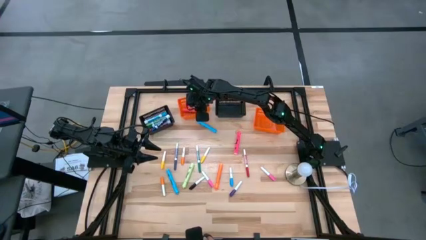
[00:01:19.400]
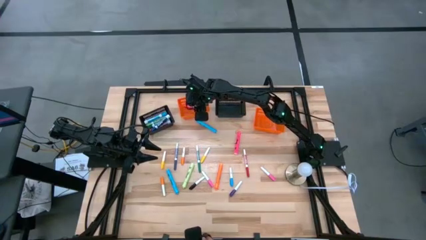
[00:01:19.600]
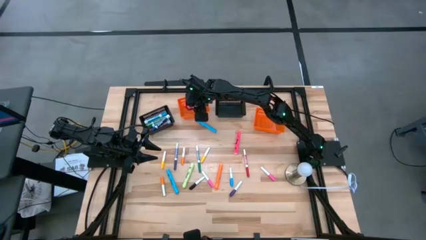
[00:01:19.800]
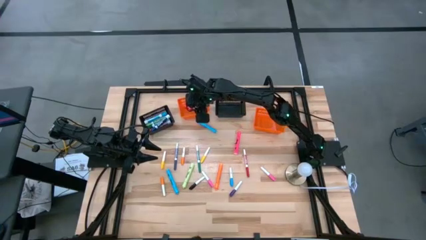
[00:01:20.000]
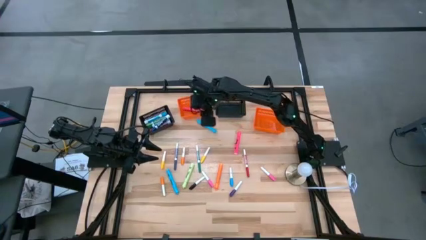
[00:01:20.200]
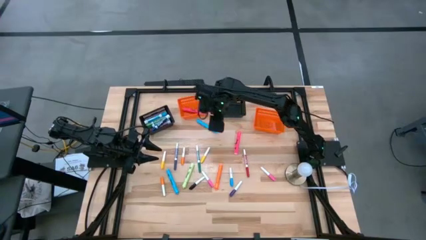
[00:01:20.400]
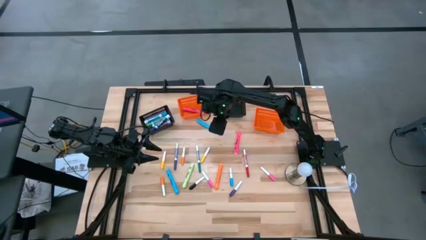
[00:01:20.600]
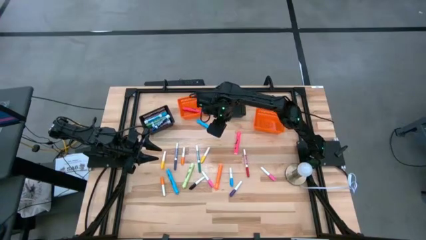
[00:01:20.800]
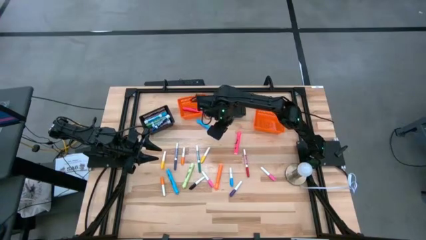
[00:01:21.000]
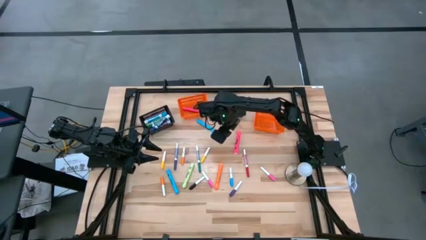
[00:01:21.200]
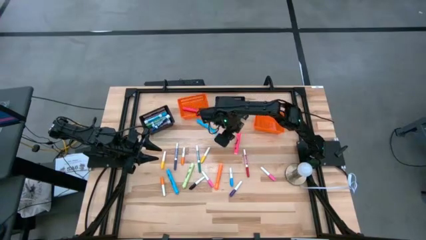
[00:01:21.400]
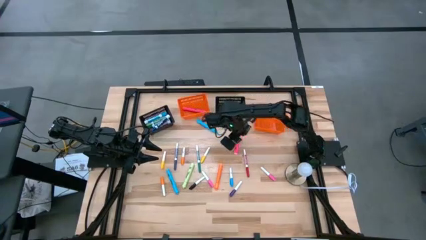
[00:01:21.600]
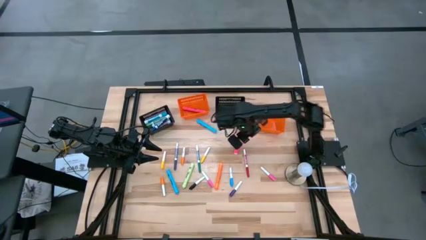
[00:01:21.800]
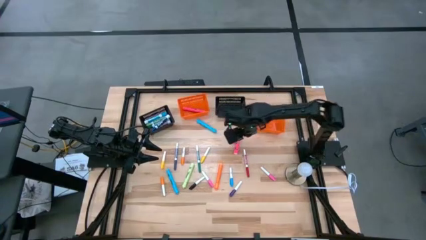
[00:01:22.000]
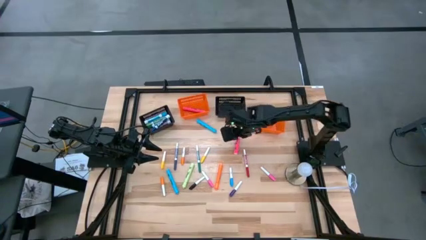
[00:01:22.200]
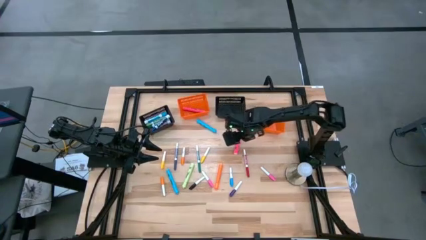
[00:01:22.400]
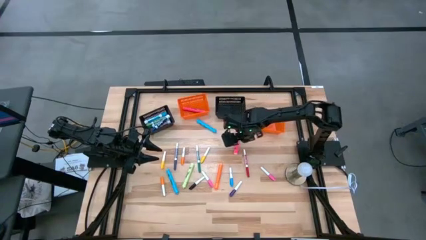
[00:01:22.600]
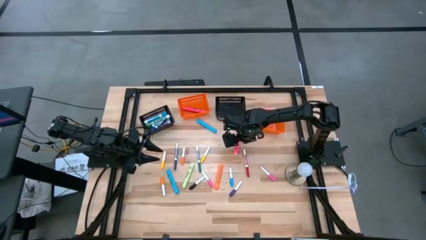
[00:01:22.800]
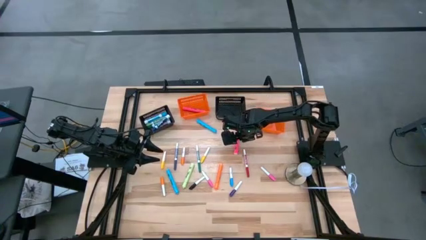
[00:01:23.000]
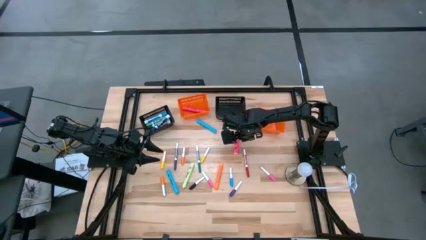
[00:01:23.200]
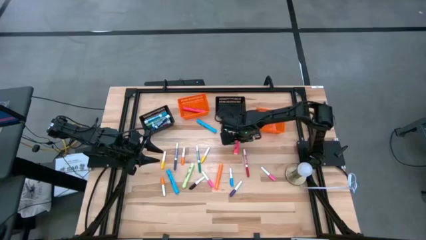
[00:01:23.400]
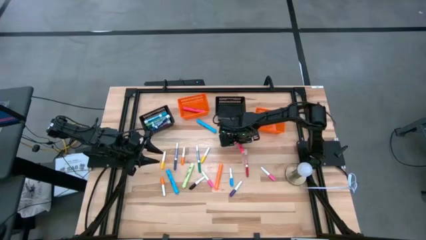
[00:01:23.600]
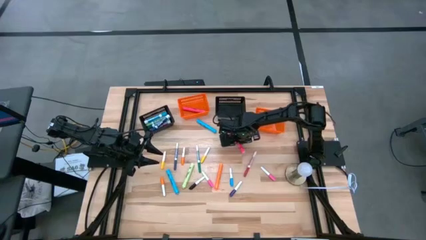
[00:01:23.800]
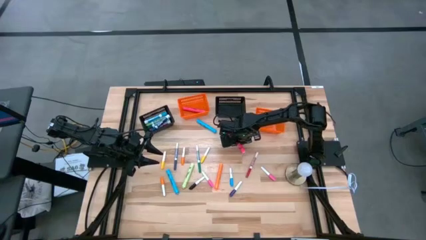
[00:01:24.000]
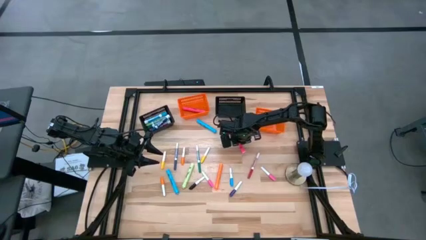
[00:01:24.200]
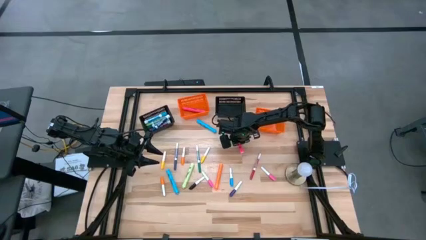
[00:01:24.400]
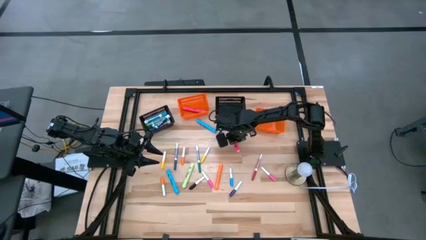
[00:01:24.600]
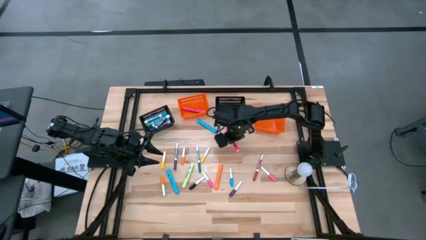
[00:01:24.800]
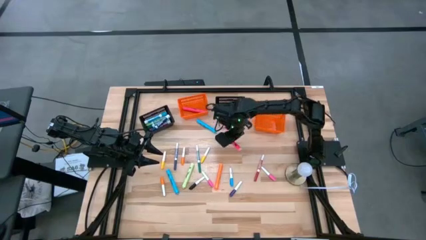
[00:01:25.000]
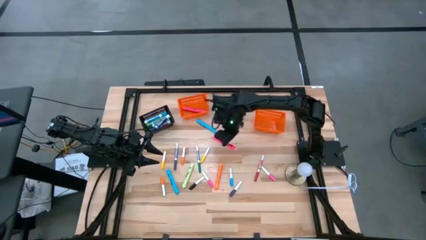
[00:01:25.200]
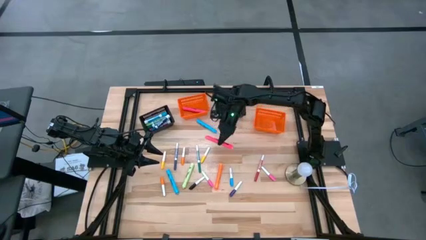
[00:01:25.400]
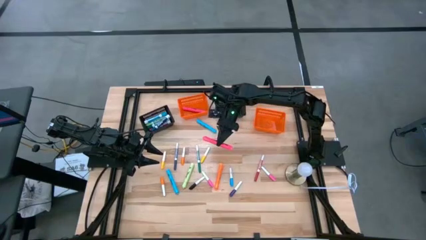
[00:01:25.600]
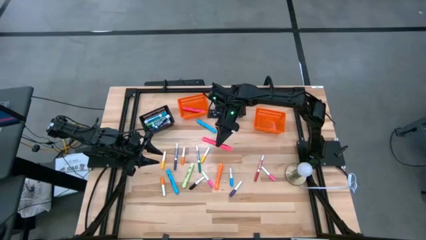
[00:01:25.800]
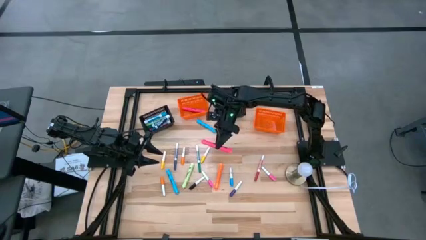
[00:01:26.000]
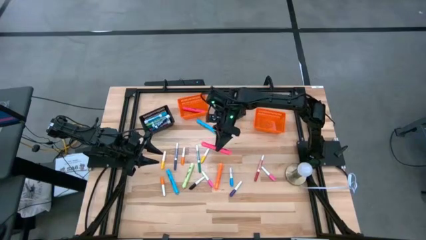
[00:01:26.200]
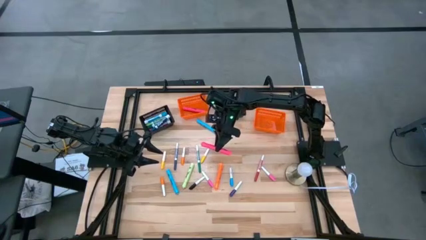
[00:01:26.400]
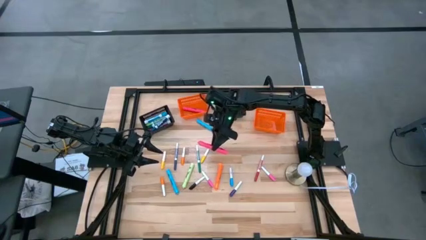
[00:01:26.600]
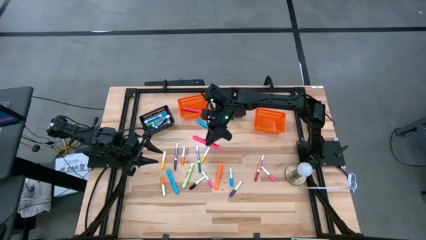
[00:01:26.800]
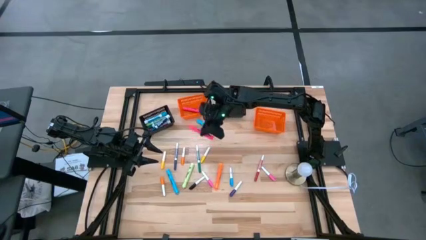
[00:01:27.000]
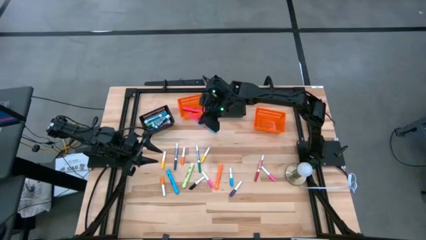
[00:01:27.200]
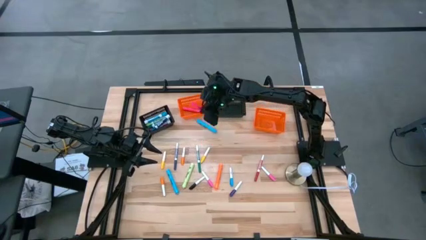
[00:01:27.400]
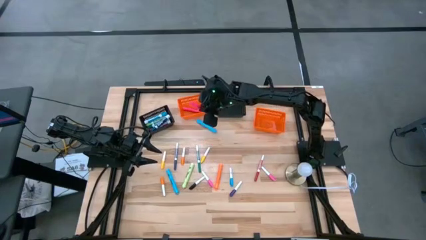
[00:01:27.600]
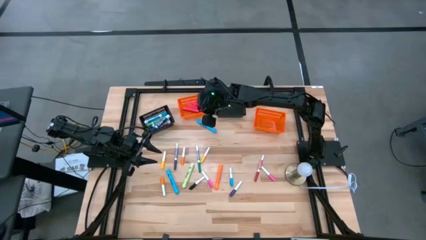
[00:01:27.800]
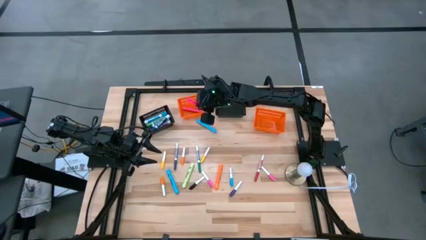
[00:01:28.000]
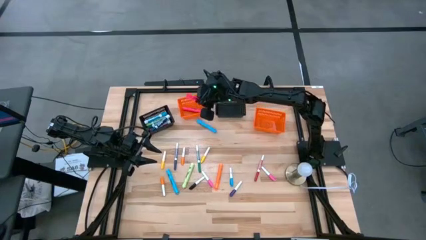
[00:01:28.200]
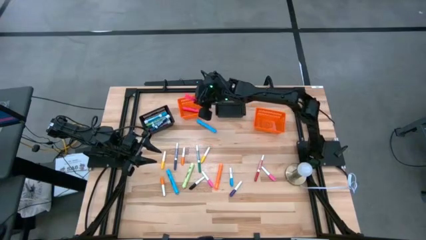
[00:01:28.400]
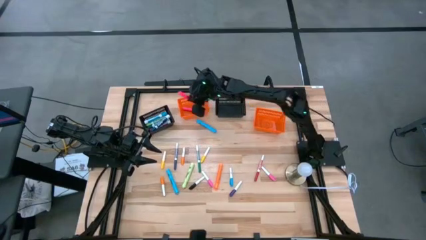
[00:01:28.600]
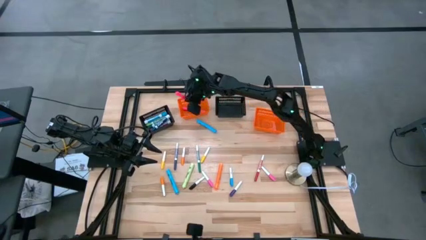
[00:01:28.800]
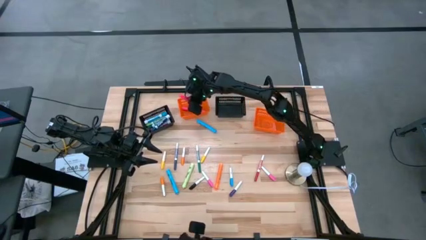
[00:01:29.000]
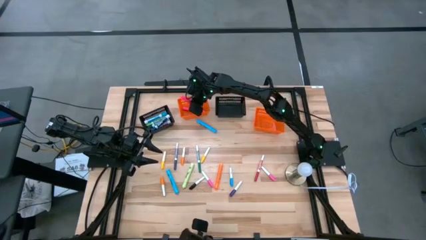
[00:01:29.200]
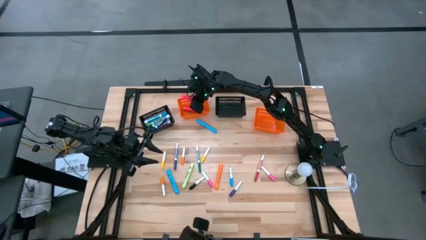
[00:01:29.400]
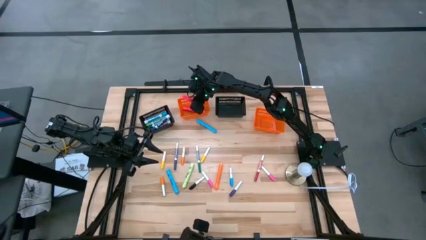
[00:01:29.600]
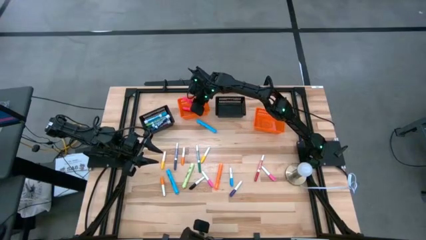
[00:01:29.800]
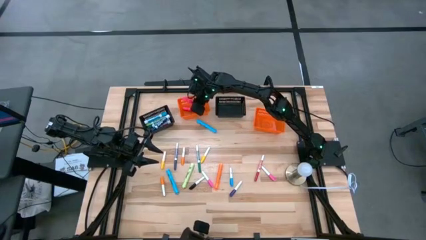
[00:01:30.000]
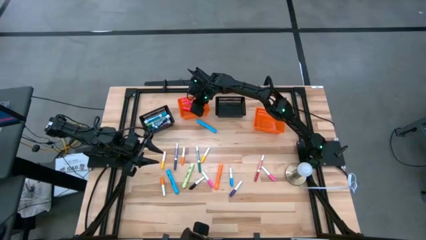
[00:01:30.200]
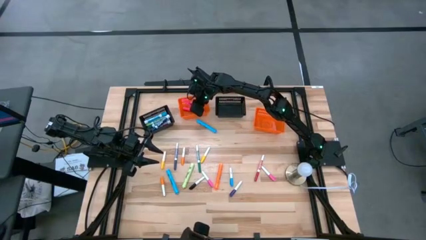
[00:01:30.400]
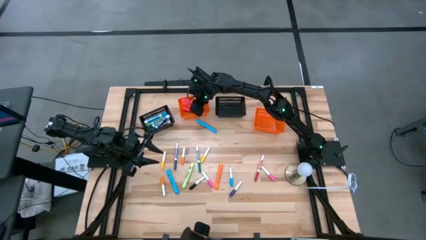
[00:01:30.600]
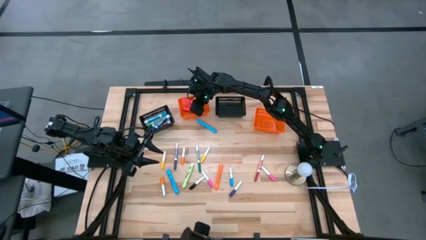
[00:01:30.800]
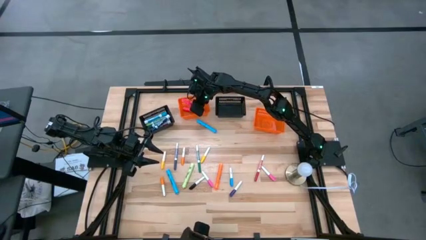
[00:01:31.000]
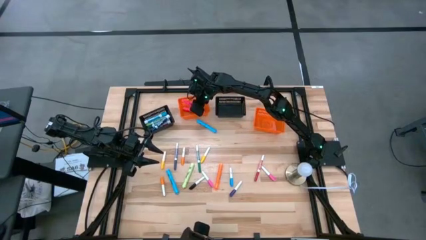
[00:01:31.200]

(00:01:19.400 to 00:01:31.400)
Task: Pick & Place Markers
Put the large pink highlighter pen into the left orange bin

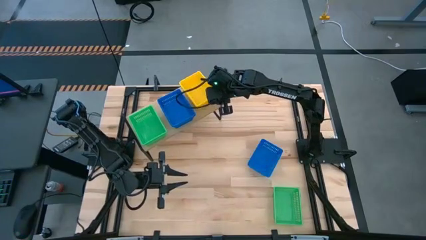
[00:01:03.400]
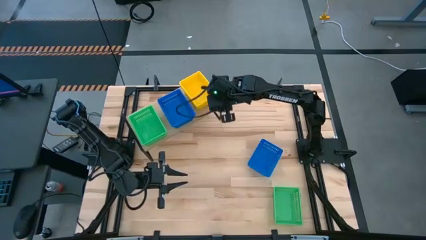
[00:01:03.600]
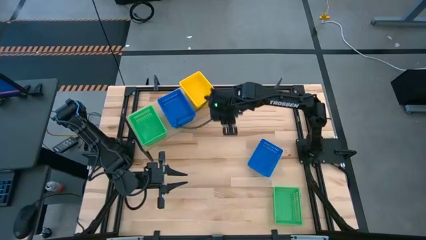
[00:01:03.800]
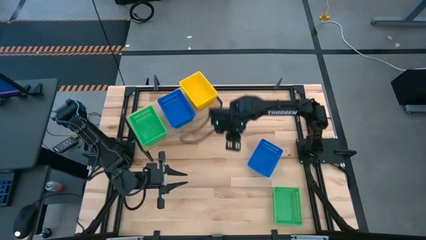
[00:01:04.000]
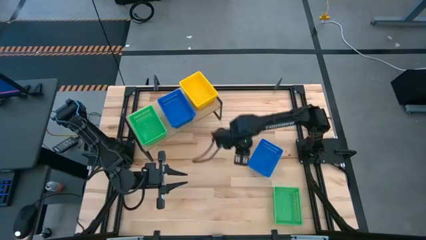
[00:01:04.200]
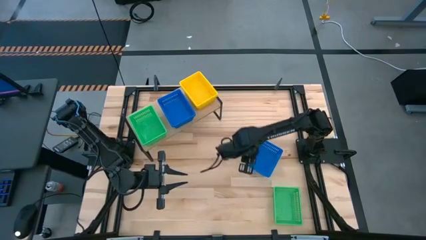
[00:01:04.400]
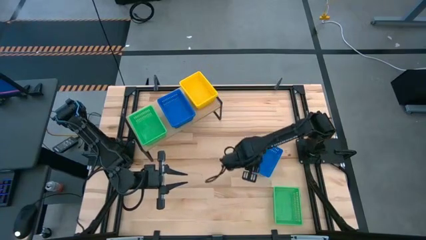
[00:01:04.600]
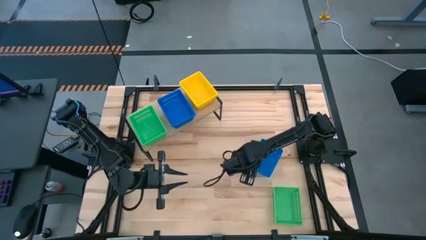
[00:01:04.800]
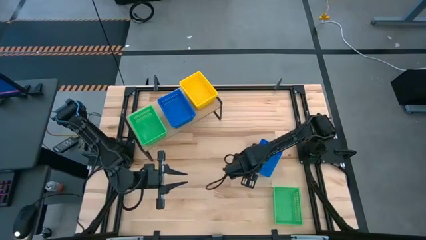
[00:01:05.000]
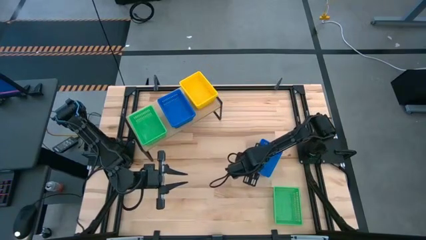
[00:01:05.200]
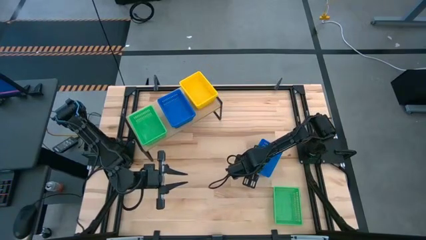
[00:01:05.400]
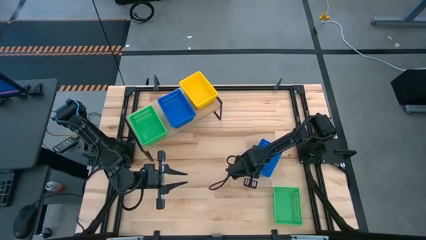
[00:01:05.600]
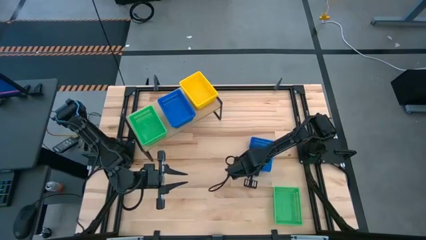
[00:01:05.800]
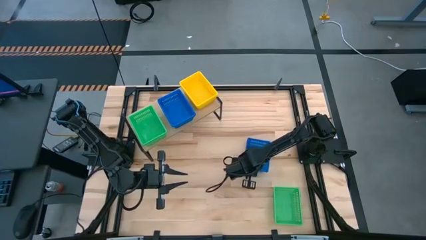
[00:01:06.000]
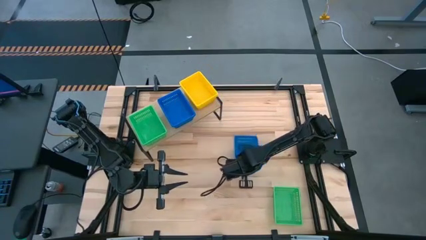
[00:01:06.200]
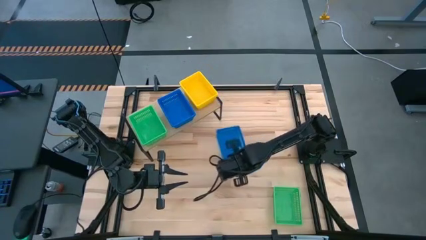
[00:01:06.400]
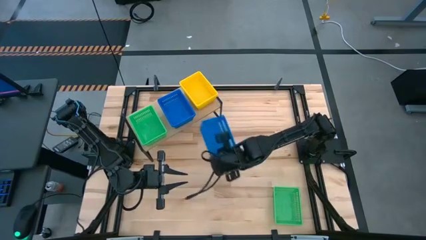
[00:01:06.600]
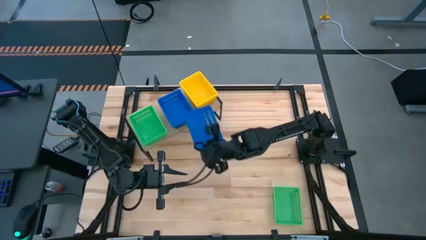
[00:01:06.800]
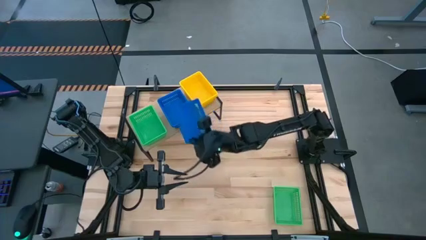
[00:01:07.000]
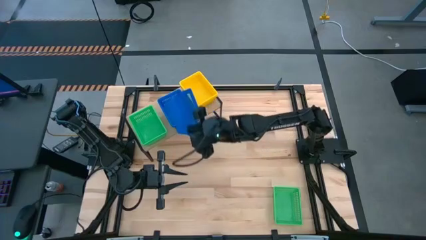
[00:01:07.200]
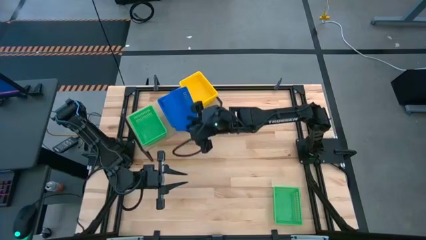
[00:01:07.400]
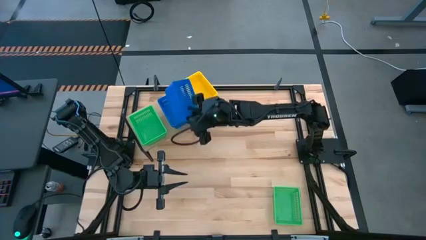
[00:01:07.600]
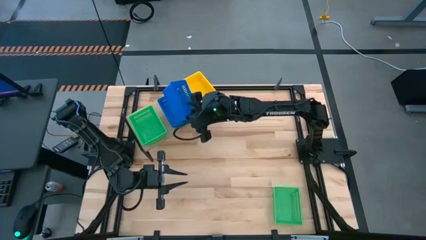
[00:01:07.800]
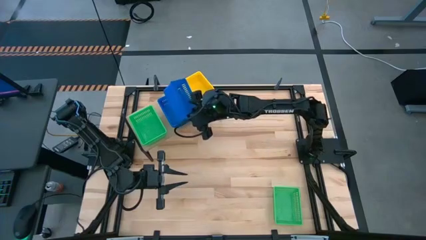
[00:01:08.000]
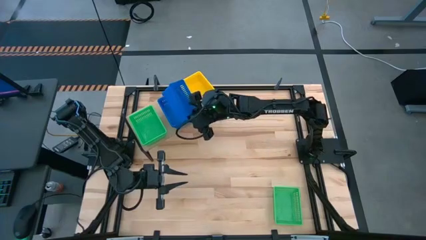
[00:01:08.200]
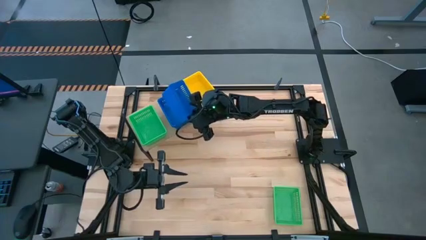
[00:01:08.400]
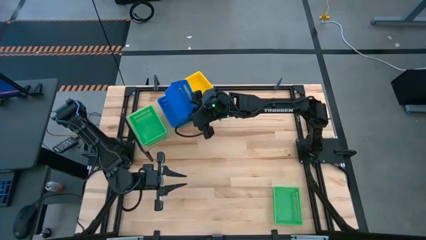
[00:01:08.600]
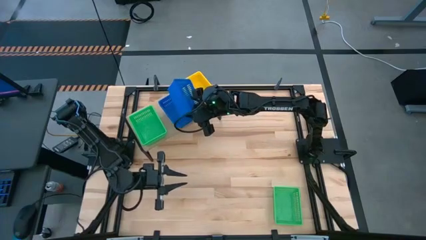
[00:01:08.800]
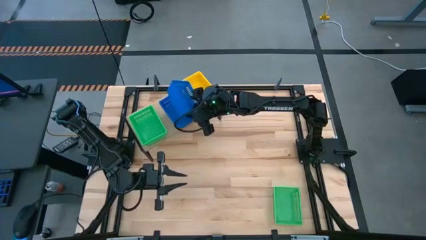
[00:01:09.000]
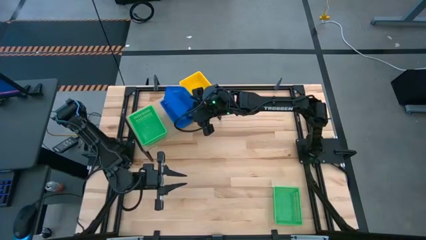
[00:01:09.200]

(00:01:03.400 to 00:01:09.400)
Task: Stack baskets on shelf by color
Stack the blue basket on top of the blue baskets on the shelf
